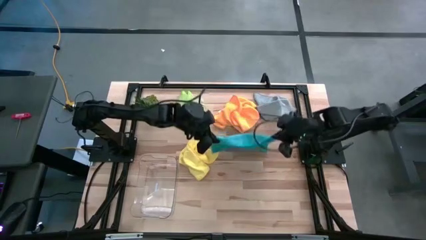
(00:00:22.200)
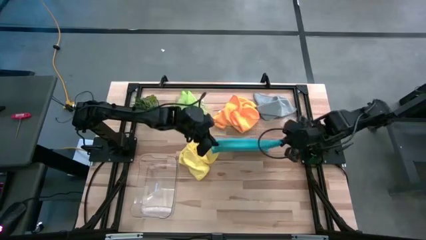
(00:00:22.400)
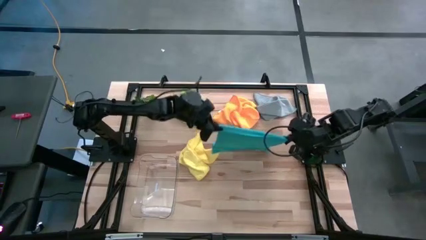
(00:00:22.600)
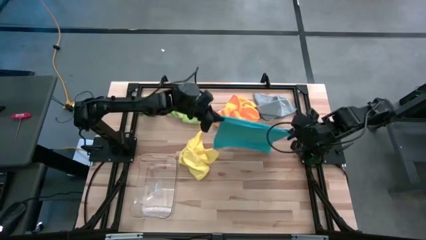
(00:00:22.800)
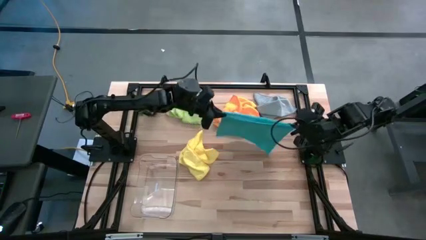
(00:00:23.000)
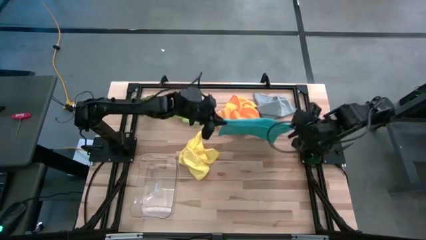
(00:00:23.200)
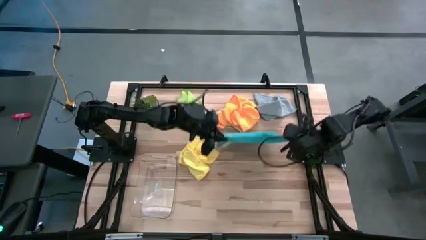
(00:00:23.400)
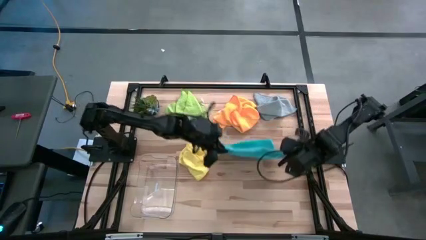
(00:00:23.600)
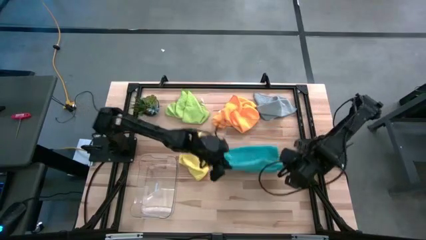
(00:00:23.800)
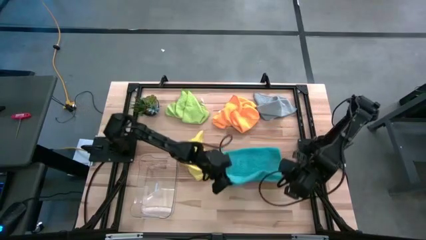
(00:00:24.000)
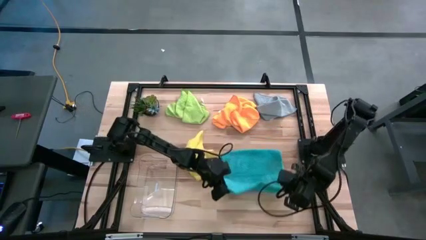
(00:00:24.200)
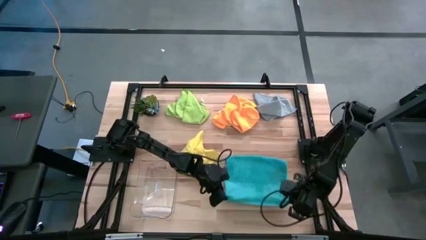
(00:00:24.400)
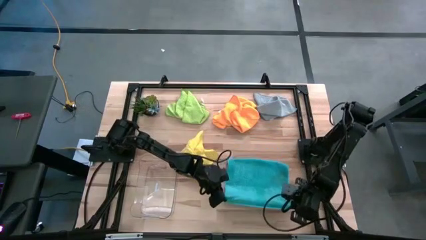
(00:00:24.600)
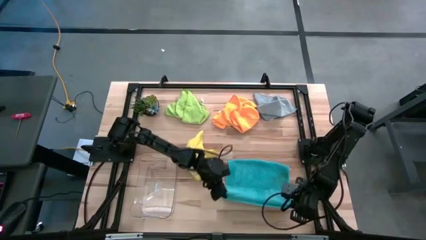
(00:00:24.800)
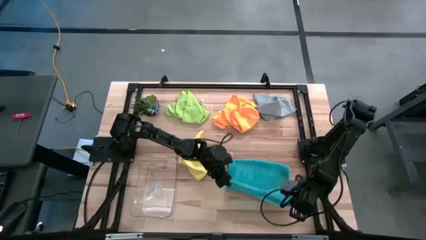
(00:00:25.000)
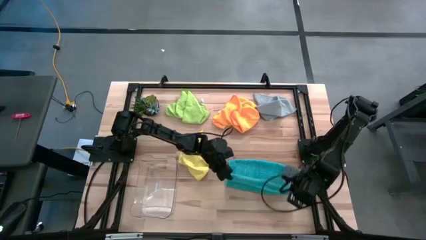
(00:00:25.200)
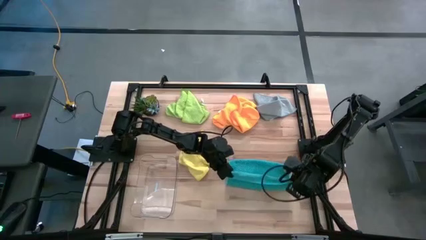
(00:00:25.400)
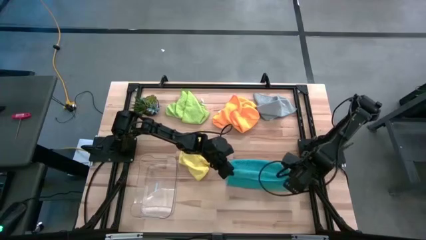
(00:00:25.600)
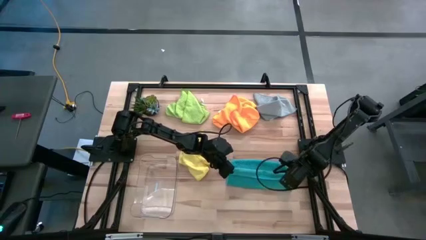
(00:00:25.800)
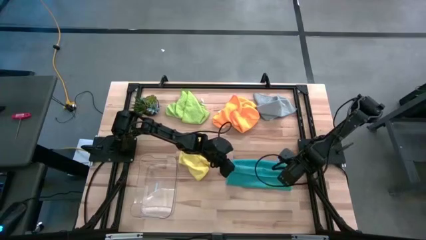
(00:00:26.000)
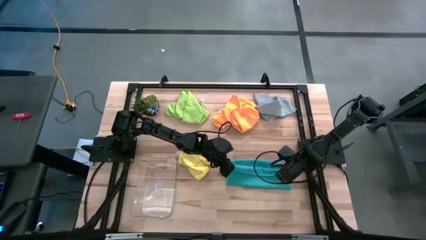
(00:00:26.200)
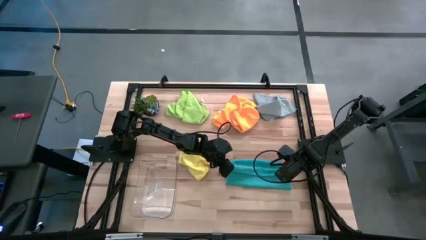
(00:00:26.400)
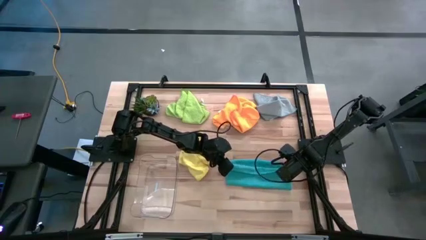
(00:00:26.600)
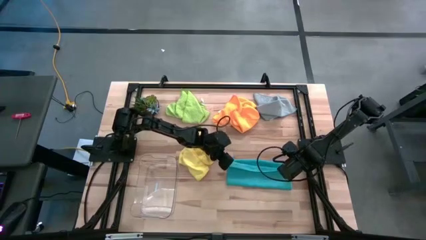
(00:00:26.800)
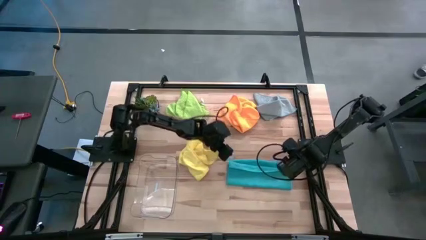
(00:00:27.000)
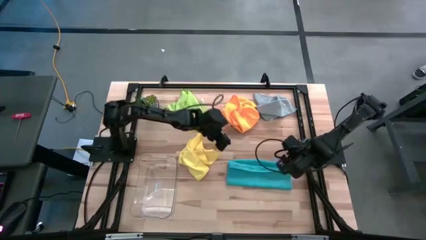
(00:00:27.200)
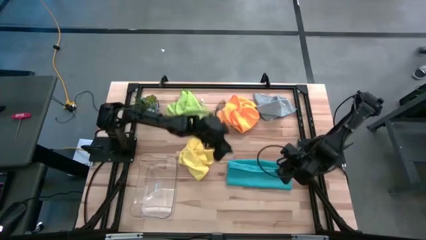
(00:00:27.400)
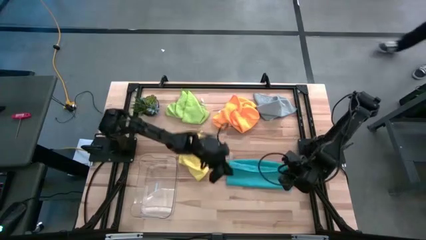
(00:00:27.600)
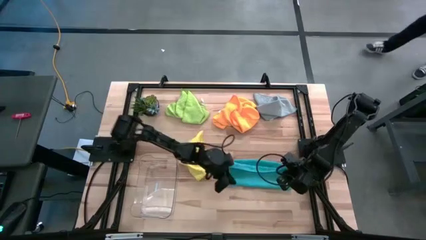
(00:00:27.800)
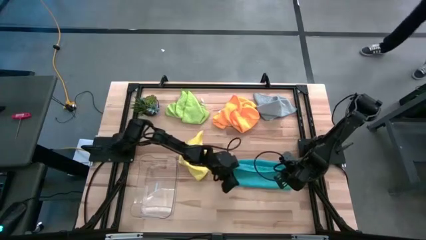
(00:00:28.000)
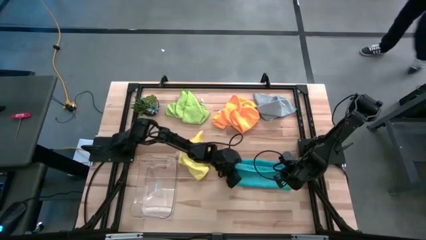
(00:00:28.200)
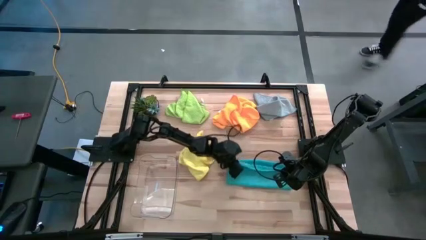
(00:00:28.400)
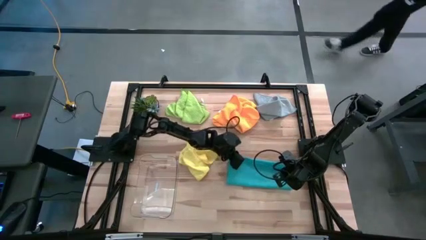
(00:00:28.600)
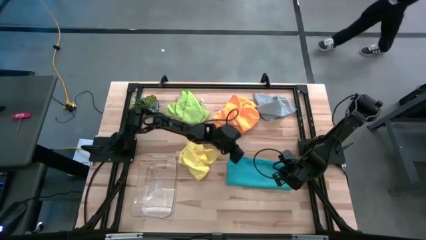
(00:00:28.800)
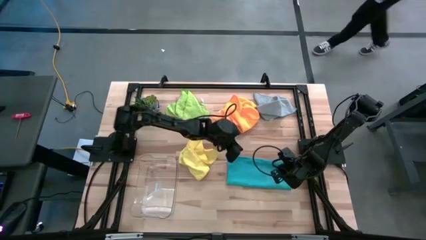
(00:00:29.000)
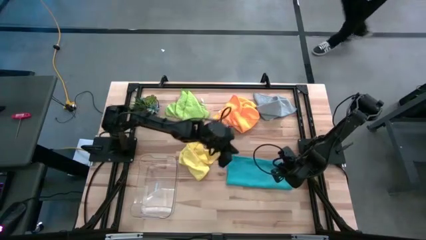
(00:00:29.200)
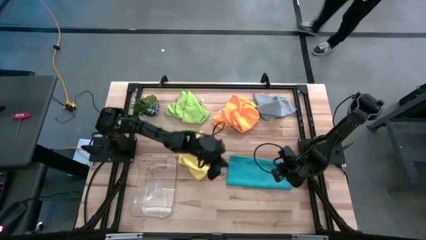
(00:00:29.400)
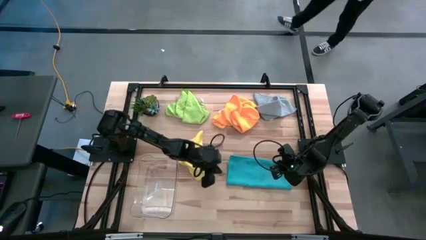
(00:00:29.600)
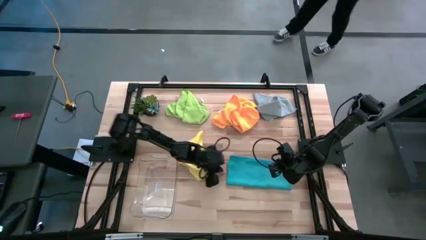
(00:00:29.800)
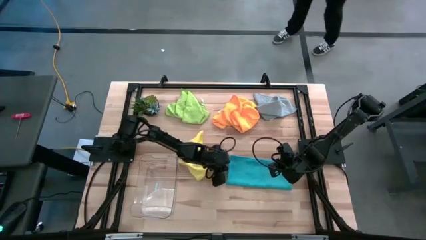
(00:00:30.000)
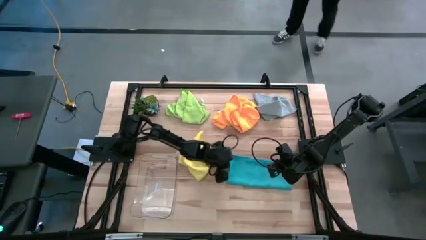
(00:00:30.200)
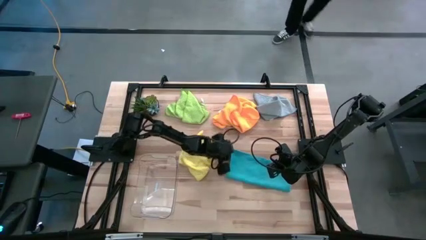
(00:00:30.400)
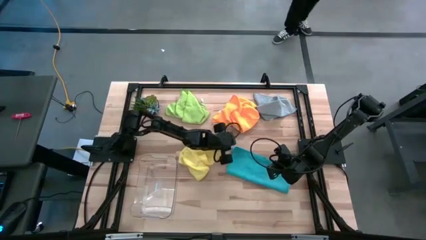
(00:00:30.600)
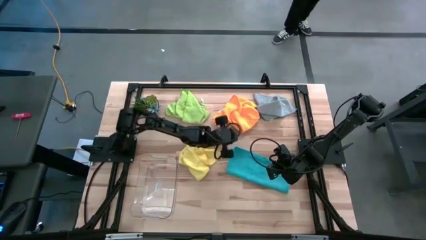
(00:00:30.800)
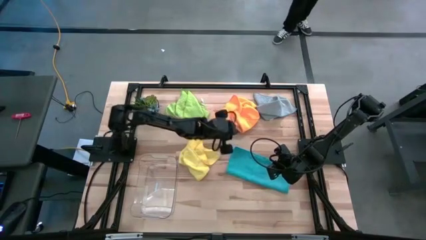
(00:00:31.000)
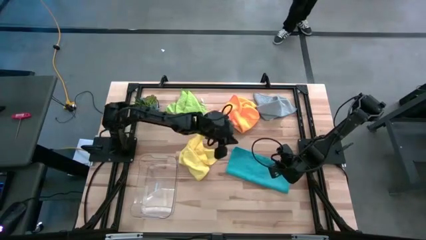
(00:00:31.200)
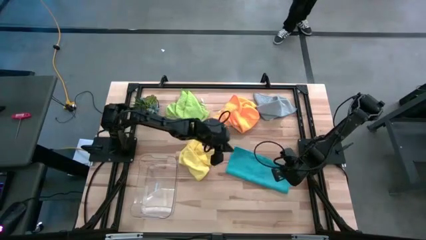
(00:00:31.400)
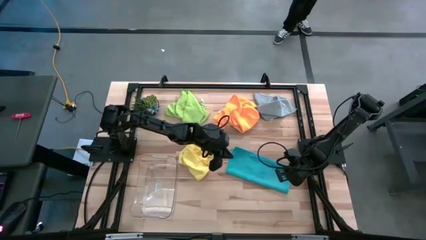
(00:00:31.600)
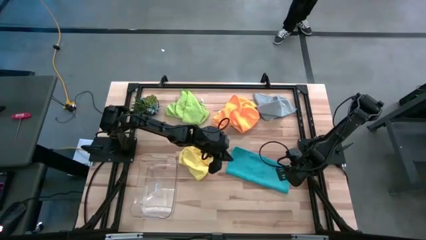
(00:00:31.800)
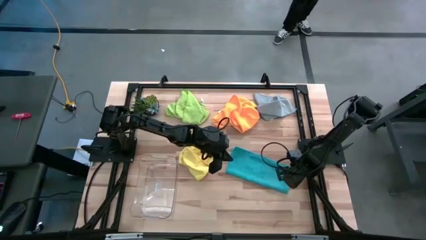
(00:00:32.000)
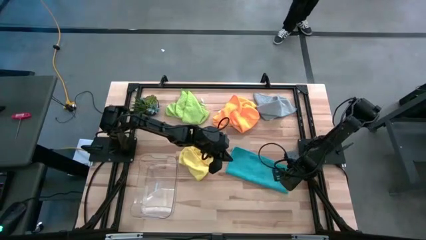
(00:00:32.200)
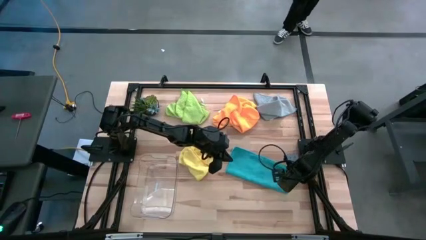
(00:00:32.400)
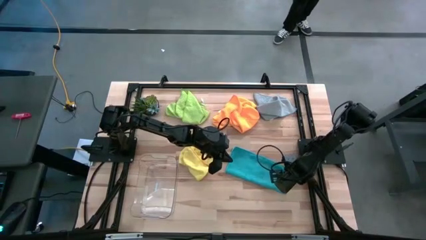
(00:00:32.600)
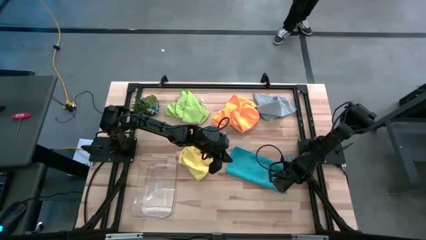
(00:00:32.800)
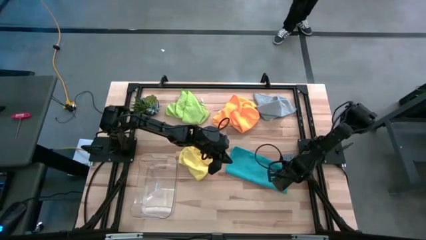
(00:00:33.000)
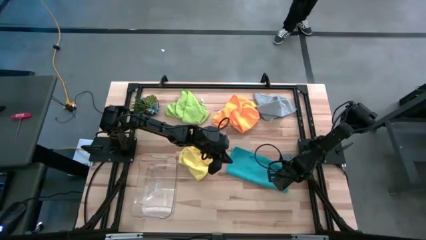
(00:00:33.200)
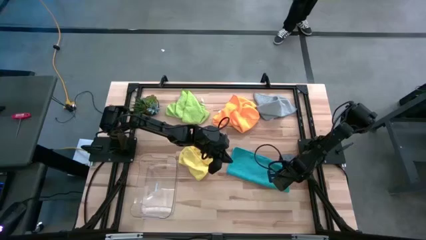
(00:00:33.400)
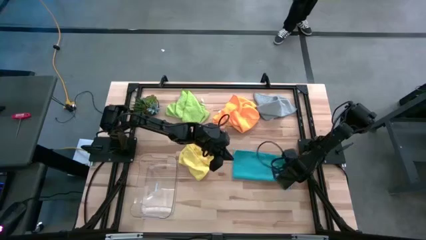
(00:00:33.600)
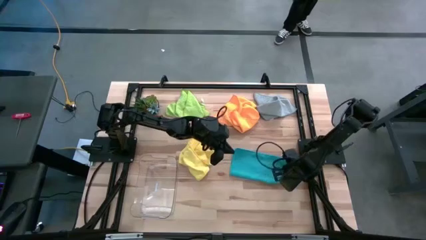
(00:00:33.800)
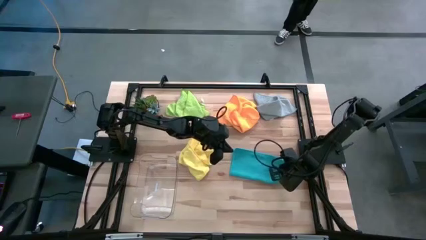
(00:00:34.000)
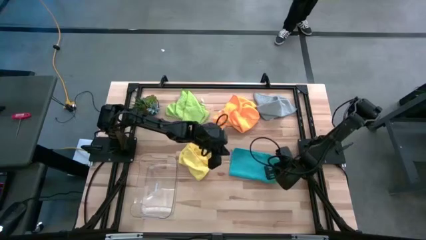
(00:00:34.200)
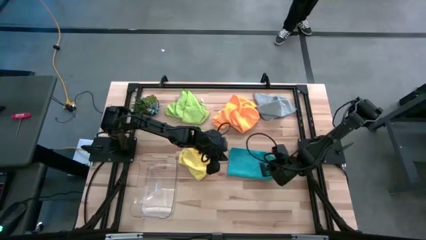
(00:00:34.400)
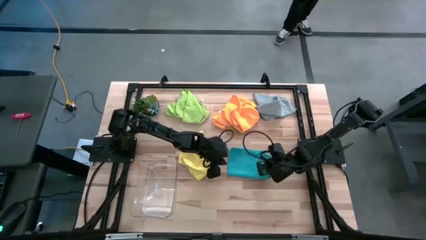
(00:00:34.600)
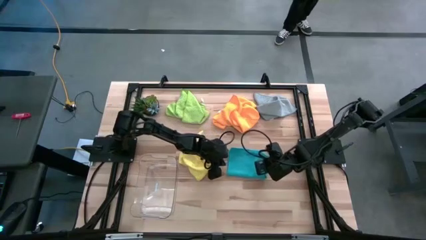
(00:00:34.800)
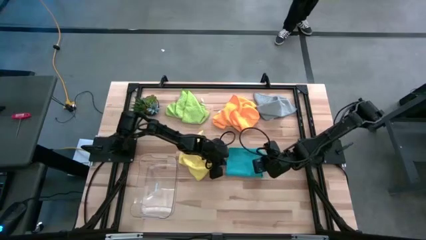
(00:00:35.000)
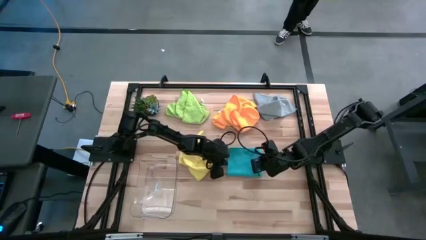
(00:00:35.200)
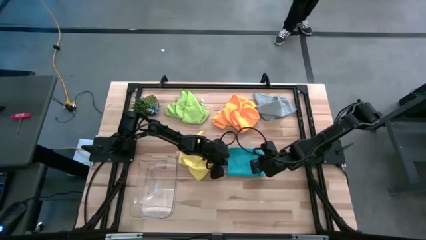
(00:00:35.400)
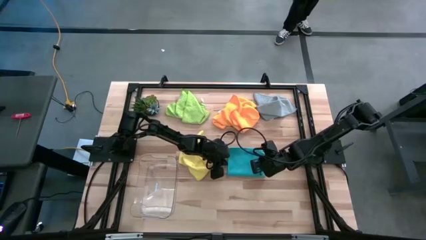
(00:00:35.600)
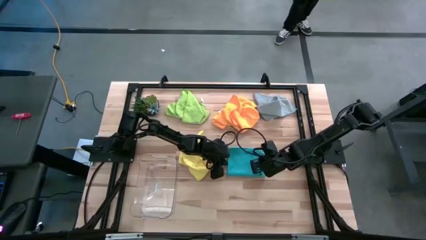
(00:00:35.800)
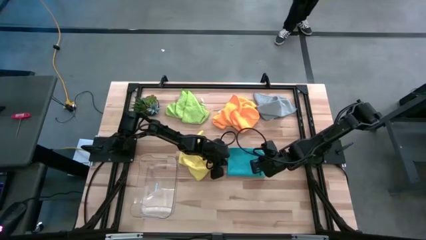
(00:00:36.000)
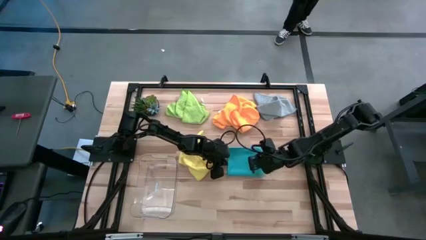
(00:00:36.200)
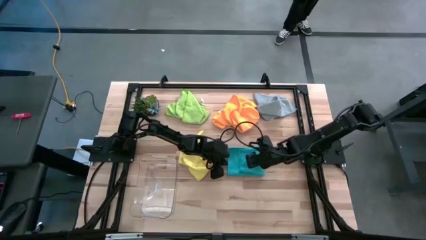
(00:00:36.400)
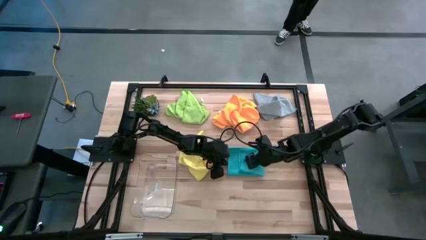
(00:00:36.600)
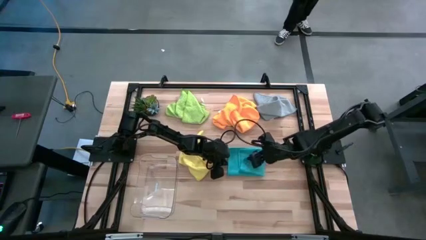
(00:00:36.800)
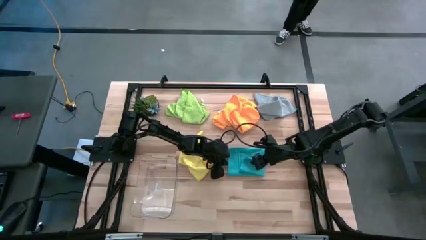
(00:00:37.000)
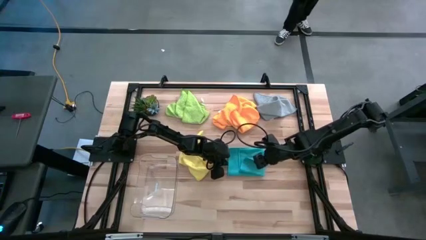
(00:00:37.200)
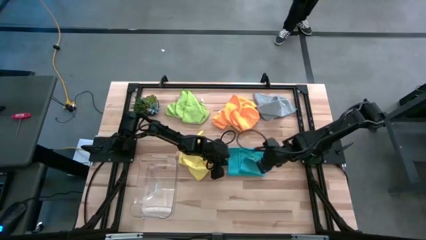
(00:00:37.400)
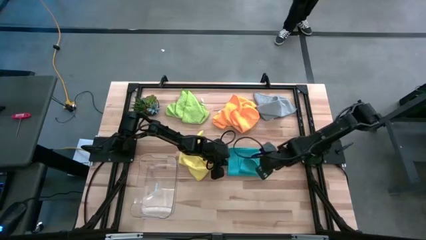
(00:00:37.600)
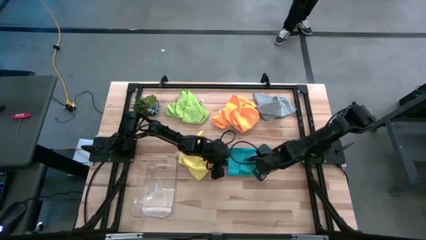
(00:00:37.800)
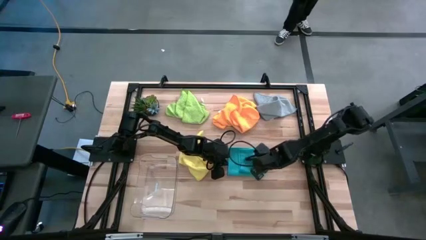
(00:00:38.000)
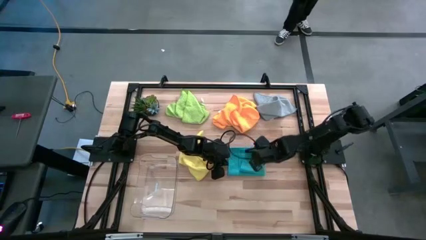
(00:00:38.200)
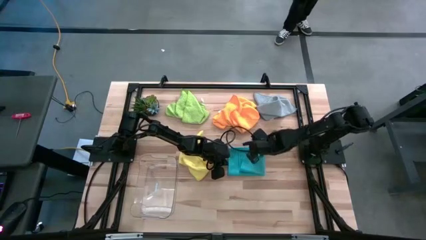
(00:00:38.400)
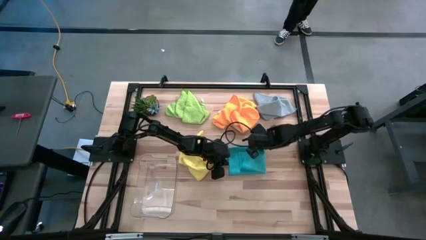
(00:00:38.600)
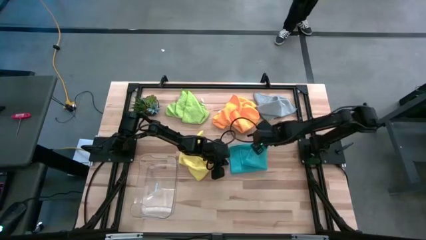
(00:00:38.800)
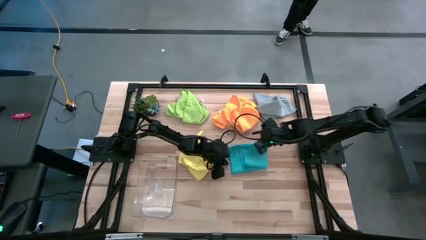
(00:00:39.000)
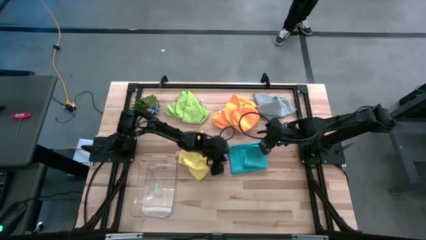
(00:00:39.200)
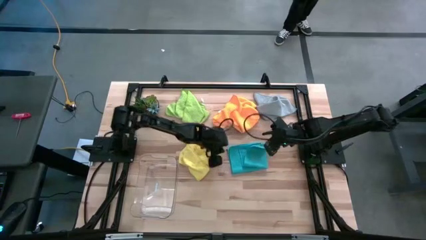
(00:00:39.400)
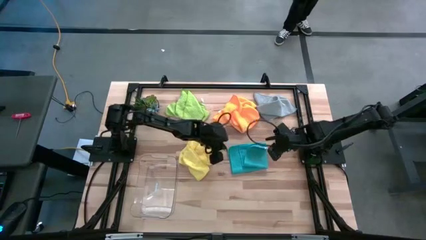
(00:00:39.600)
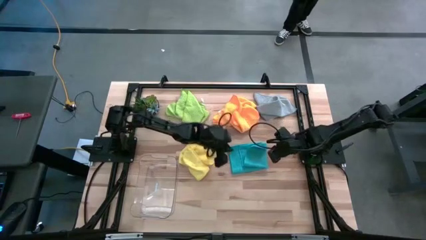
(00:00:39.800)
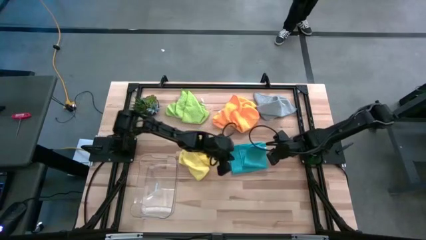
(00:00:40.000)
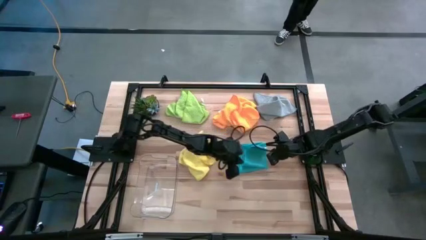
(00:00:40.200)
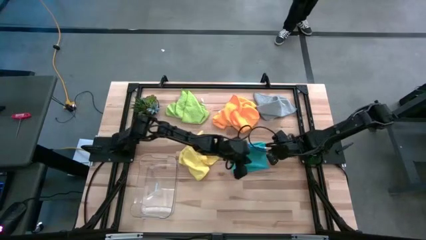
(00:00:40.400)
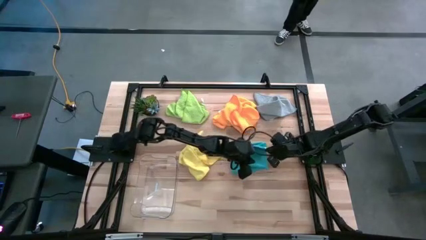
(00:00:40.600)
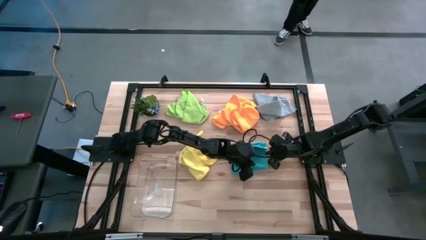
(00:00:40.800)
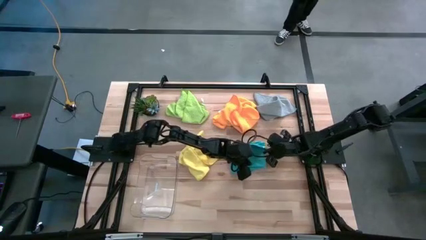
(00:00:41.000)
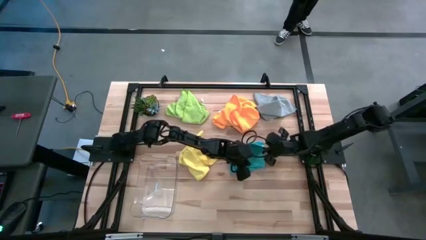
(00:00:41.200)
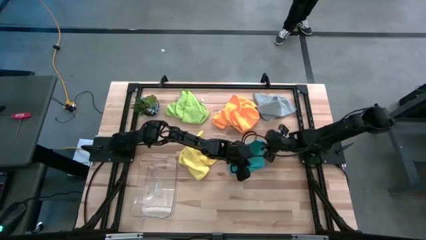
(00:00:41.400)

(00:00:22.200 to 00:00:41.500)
Task: Fold microfiber towels
Fold the blue towel
